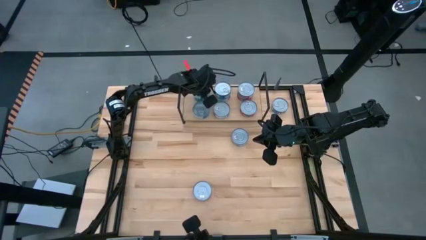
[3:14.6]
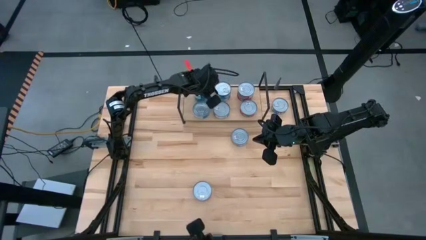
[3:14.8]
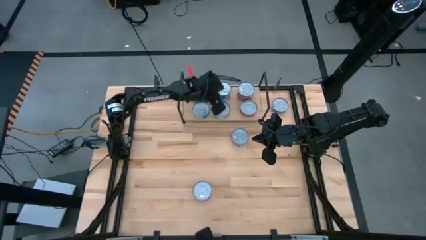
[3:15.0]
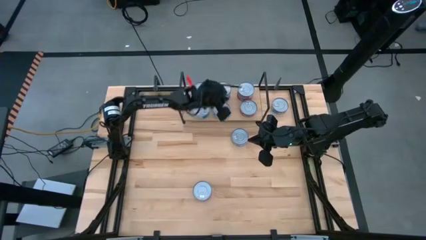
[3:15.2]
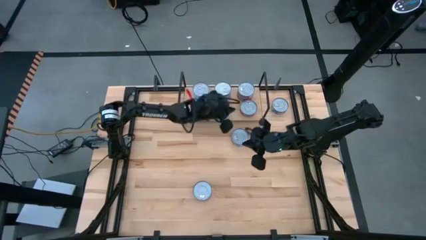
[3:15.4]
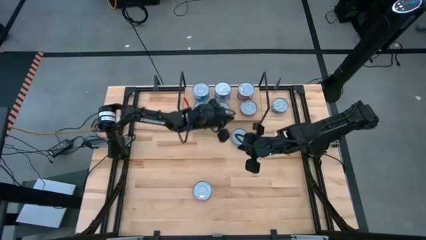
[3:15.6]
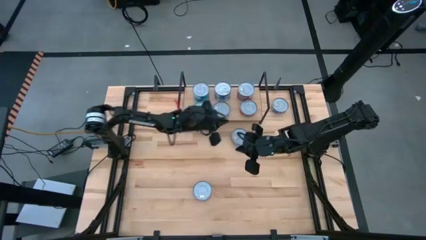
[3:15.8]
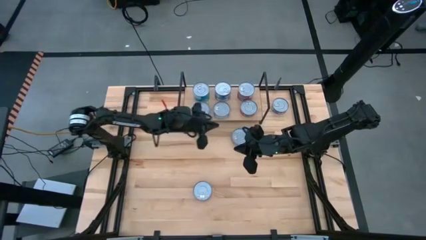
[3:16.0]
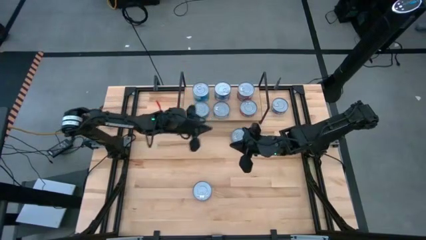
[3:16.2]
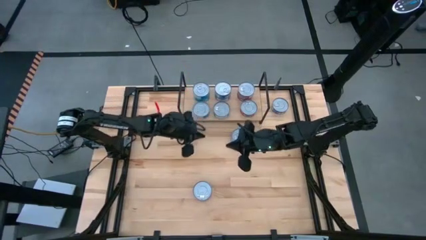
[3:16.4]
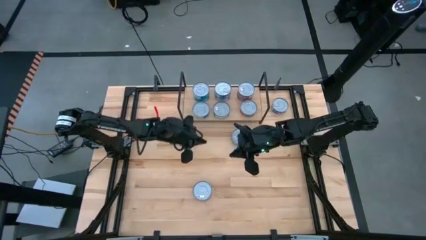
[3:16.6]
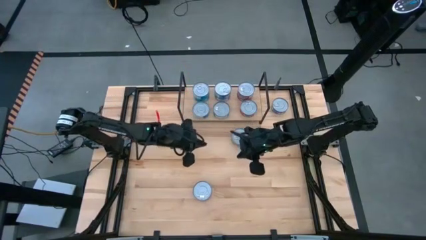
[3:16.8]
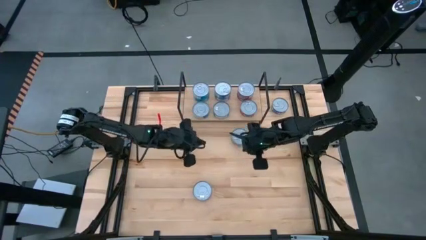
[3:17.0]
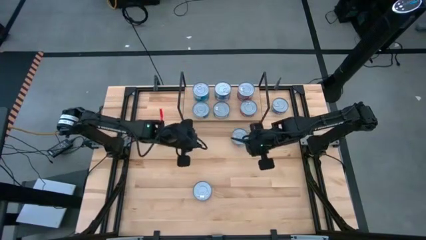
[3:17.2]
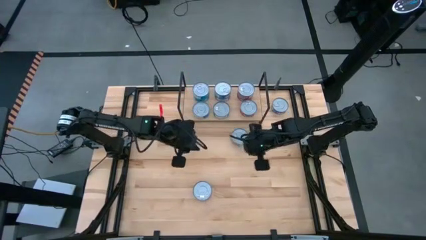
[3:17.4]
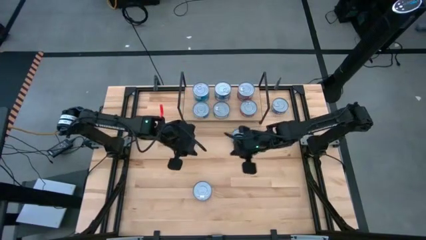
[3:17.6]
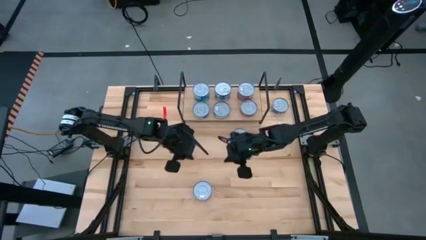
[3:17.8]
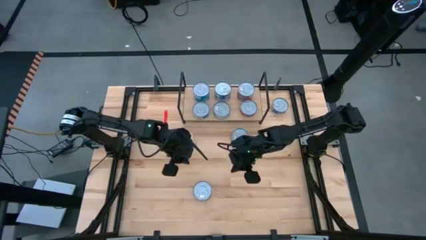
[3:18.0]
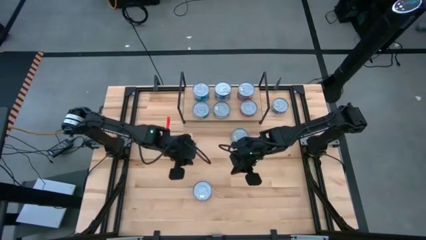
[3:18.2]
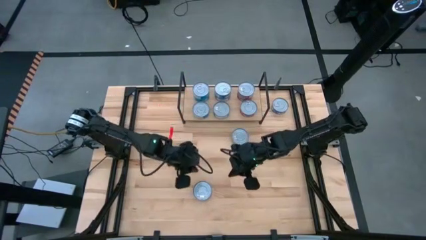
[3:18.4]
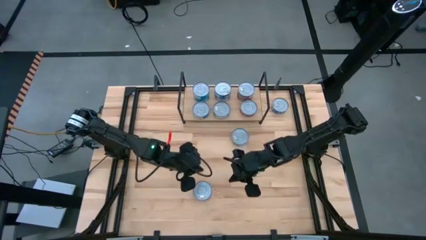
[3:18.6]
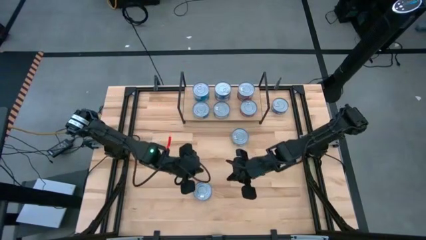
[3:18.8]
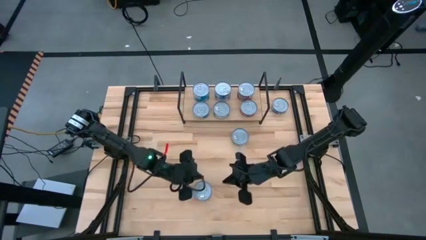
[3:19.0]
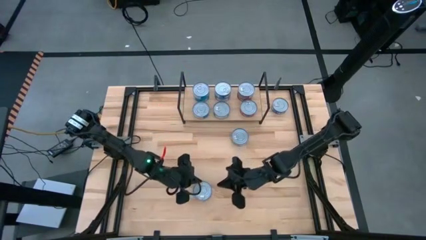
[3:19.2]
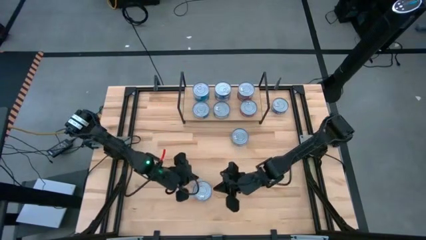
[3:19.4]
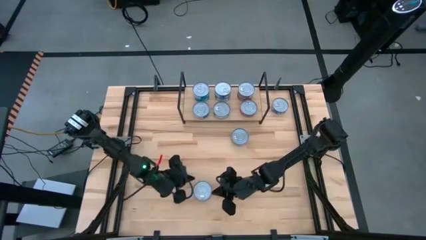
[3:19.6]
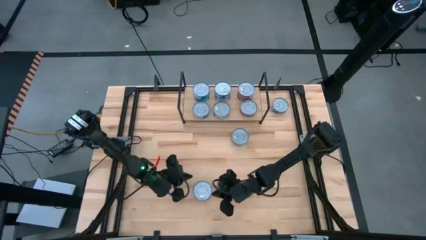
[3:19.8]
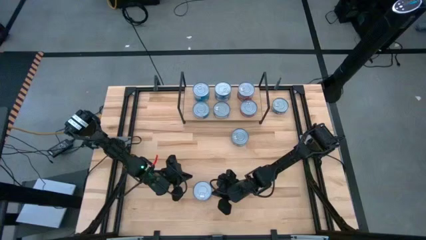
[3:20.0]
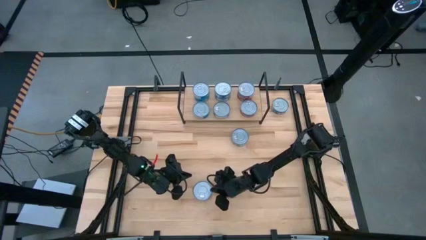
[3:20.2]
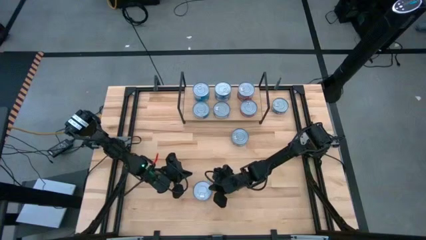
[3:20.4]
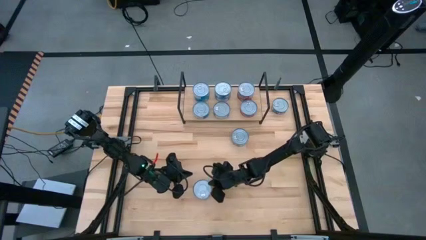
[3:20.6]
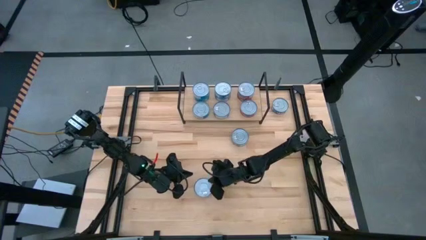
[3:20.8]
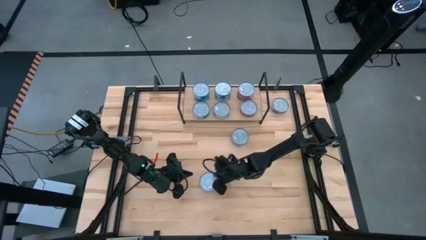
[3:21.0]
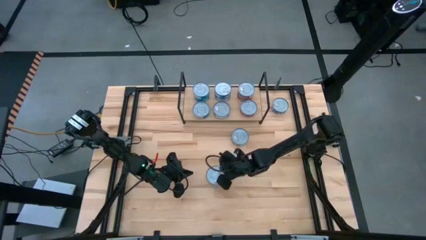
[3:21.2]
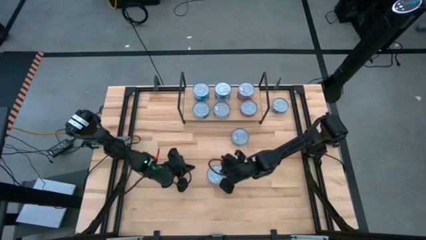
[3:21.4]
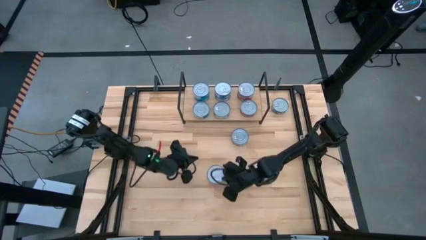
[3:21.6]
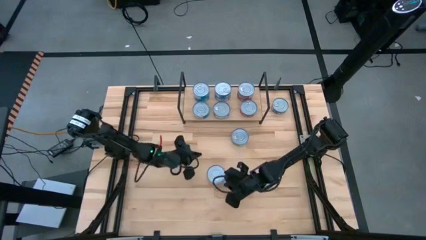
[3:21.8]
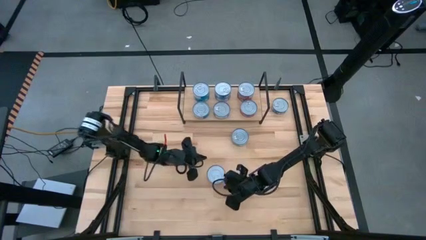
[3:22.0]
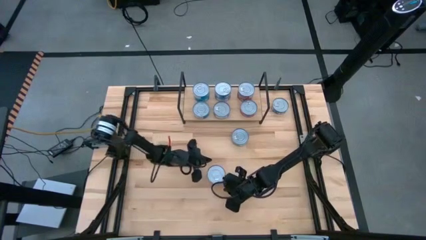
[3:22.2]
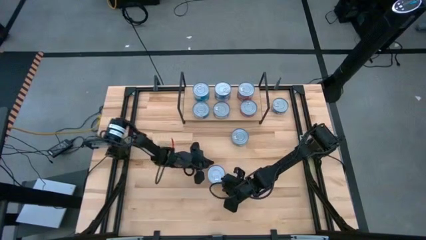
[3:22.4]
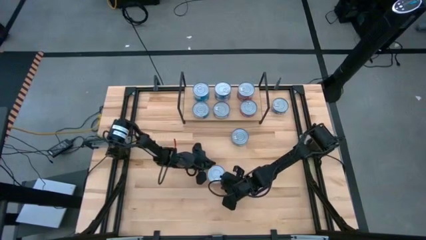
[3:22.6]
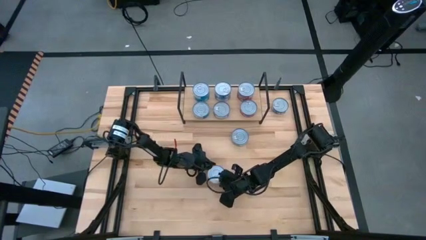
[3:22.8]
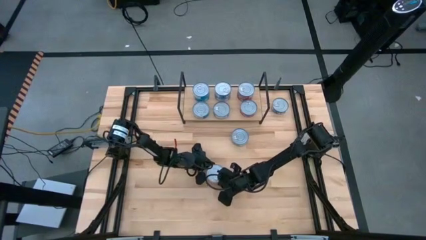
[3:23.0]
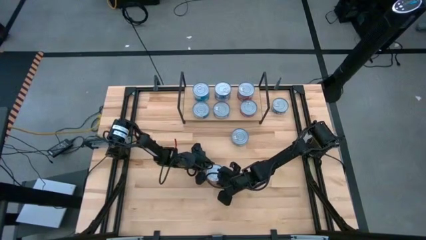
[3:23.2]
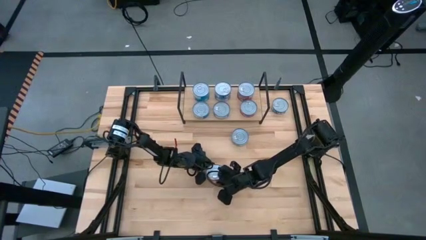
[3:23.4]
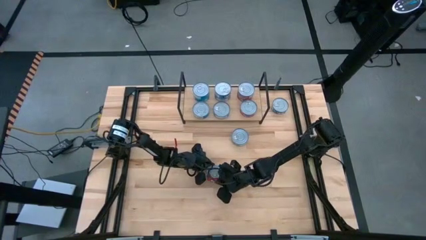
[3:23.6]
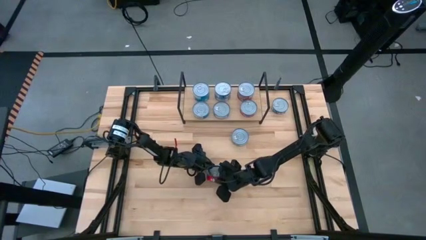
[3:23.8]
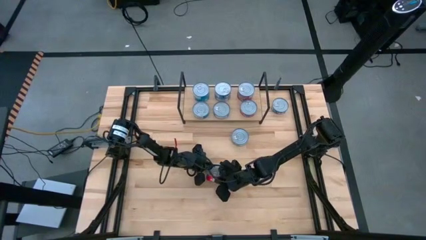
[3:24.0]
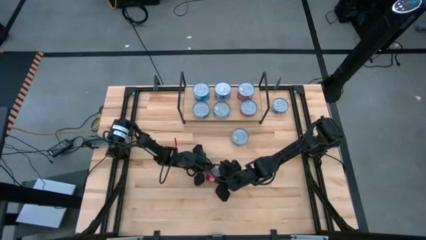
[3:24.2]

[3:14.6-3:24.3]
Task: Stack canned seafood by type on shelf
Stack the red tuna can on top of the red tuna can on the shelf

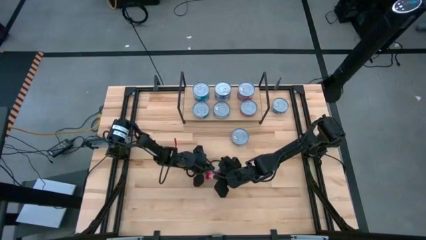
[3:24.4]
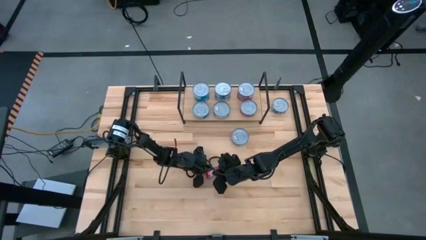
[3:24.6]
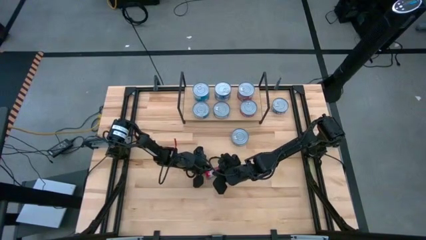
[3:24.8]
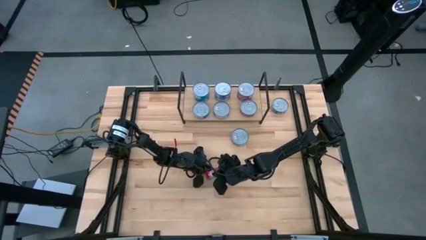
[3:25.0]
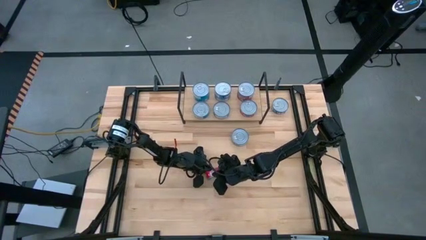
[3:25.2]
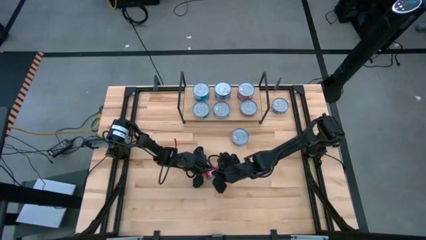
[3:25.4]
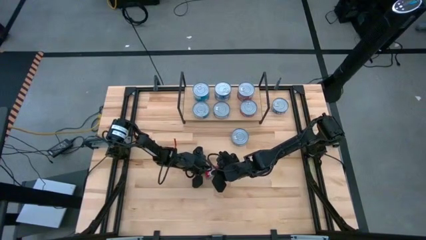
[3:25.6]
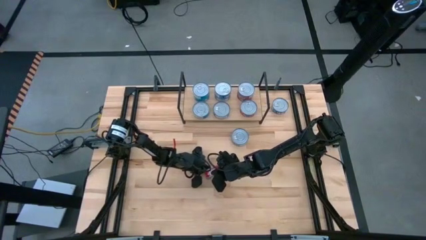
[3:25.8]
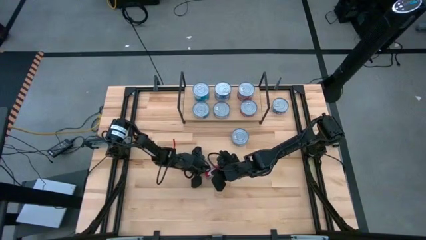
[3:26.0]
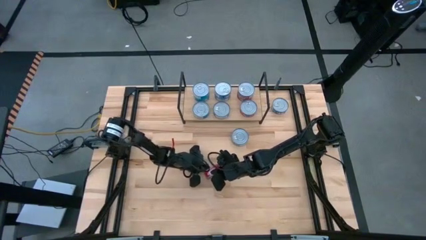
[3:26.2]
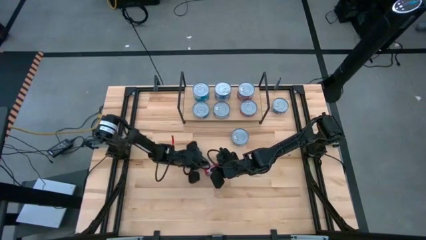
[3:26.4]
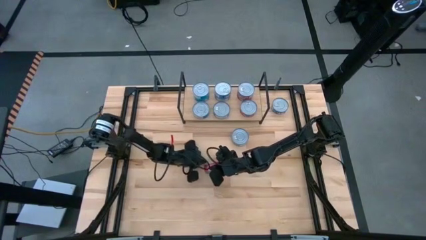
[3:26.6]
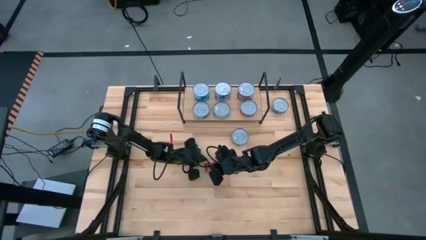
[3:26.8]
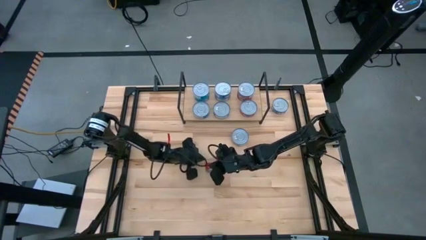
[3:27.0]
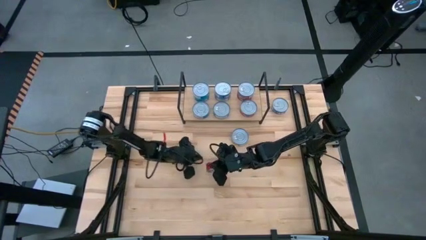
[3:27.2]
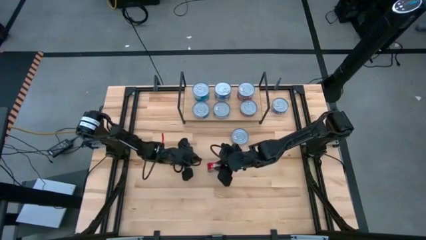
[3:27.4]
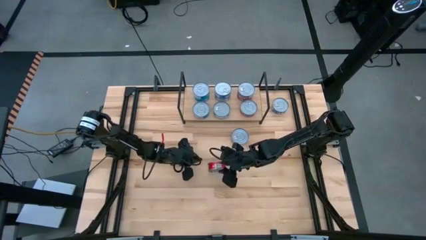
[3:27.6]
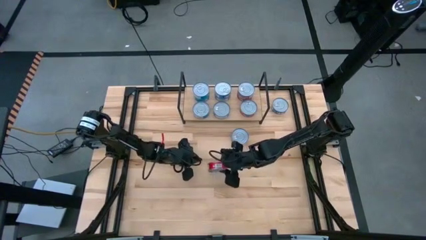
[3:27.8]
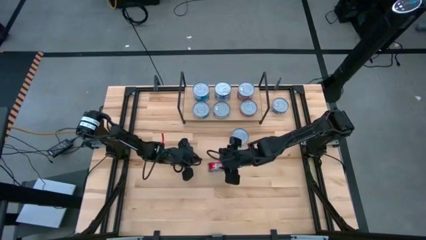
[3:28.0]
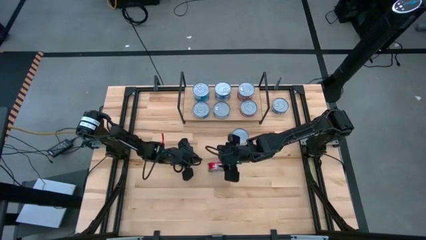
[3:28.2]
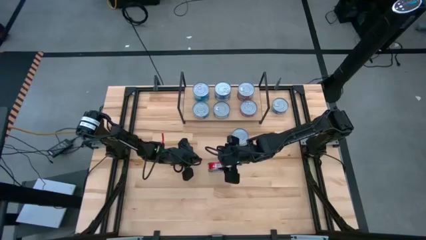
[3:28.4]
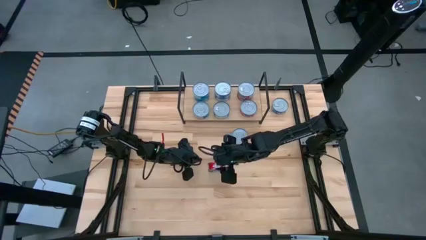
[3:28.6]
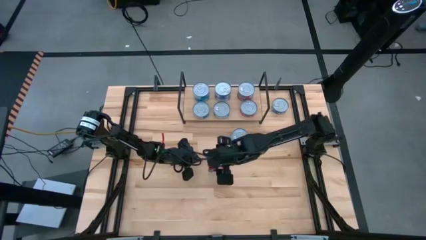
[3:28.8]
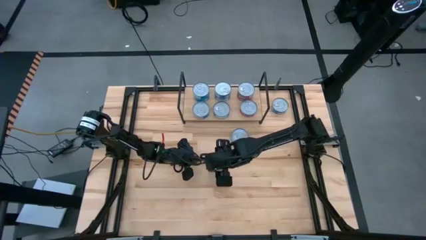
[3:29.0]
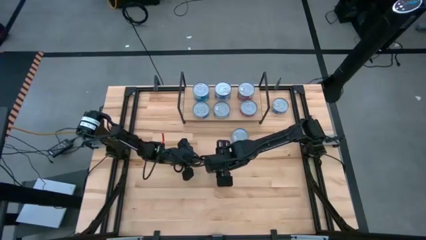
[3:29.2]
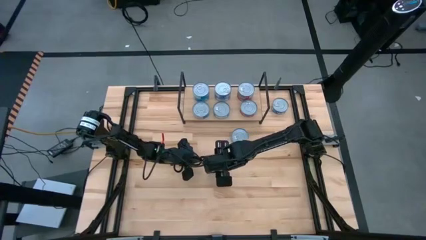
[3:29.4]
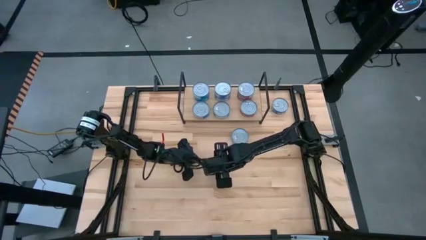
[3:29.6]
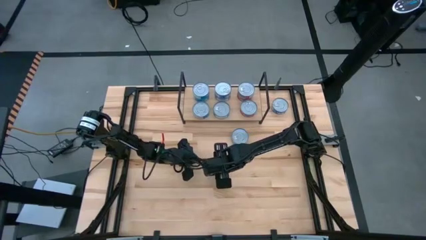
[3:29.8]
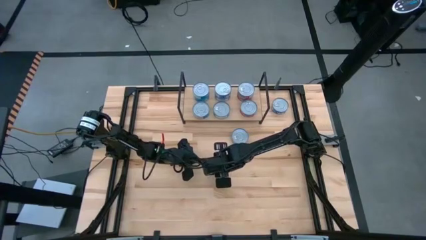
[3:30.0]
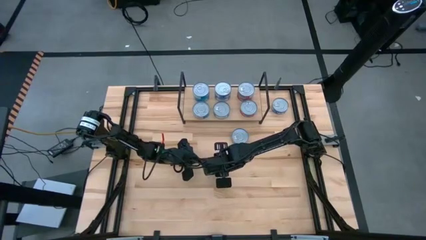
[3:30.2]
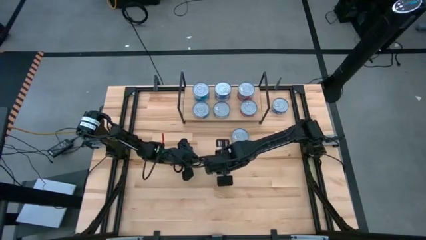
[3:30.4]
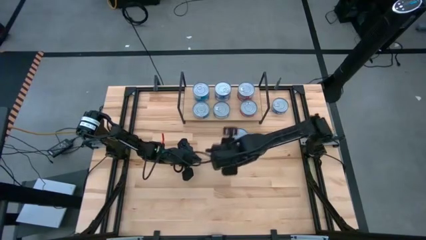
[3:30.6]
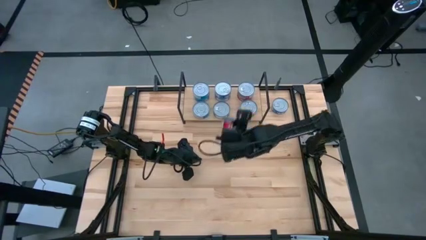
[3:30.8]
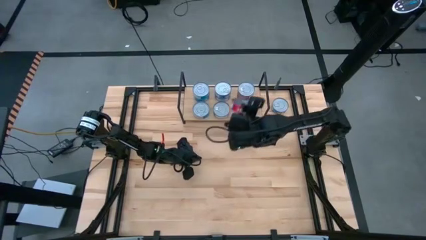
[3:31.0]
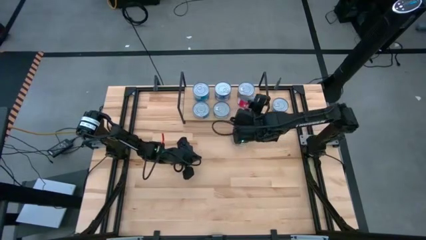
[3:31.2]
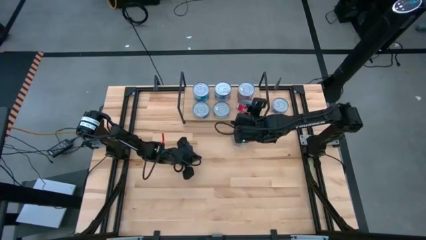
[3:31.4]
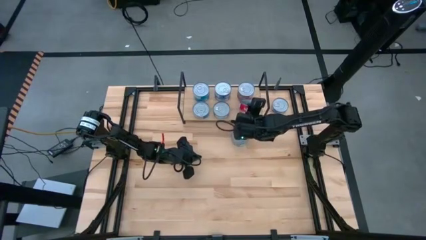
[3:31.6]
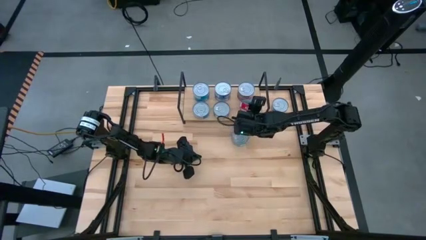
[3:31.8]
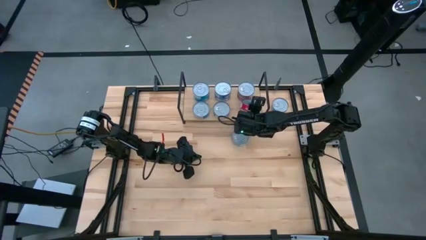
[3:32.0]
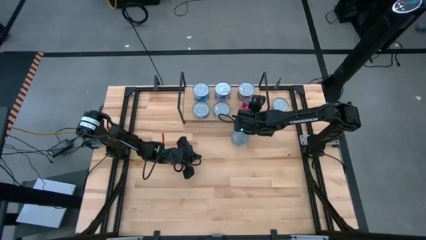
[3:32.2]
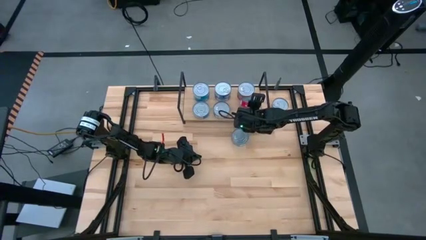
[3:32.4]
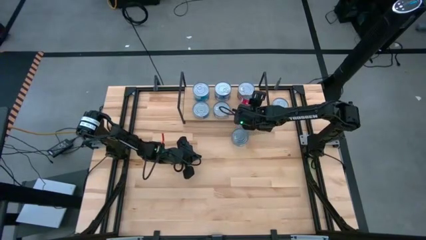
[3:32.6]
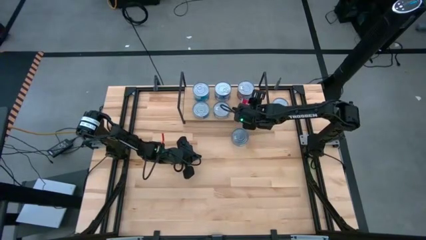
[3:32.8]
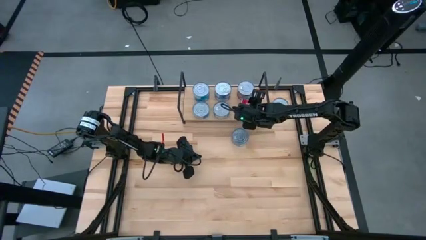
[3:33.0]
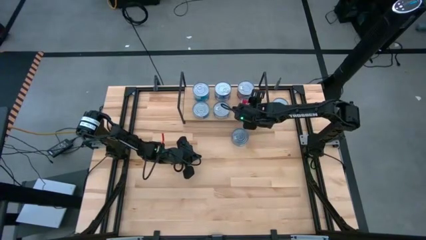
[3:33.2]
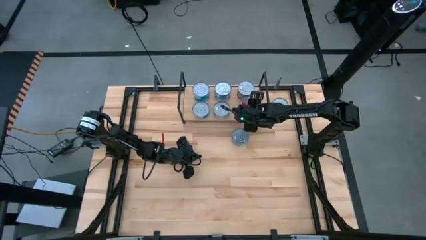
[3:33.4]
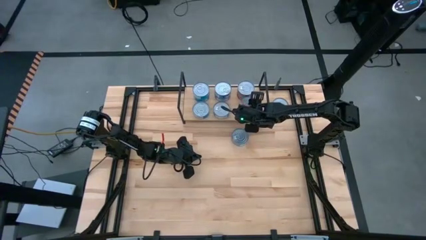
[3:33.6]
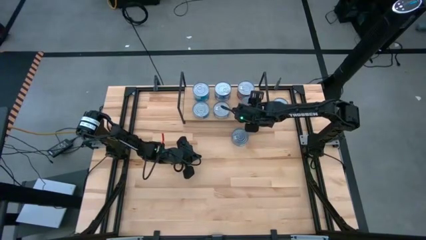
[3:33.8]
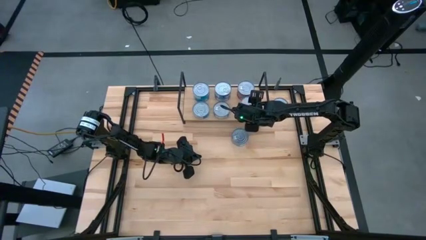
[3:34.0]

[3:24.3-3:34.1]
Stack the red tuna can on top of the red tuna can on the shelf
